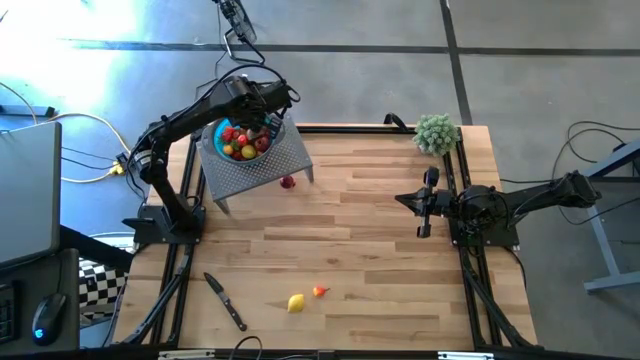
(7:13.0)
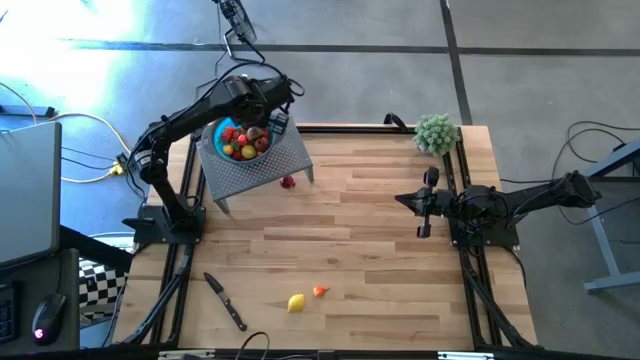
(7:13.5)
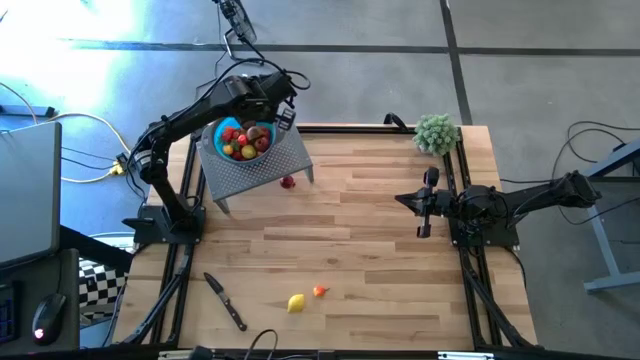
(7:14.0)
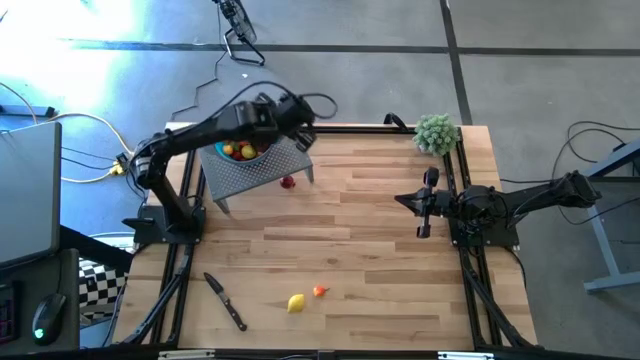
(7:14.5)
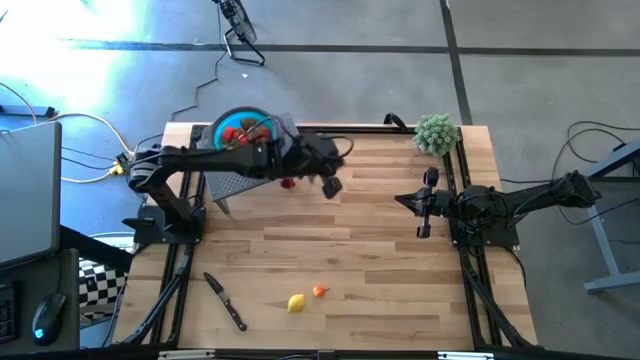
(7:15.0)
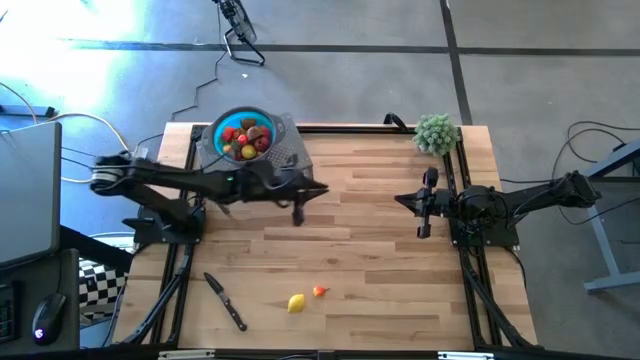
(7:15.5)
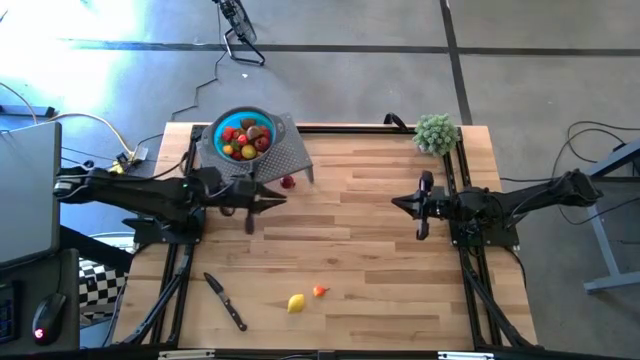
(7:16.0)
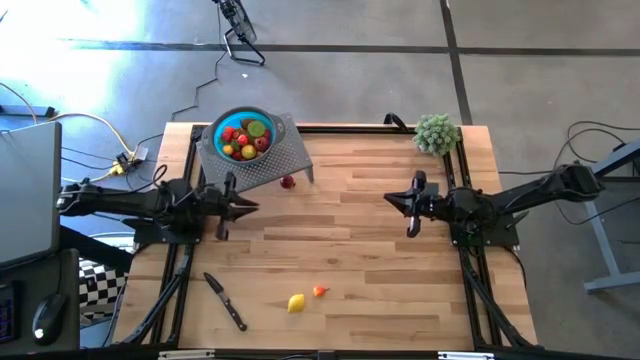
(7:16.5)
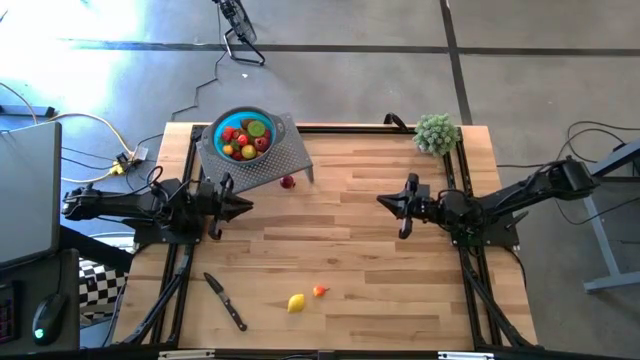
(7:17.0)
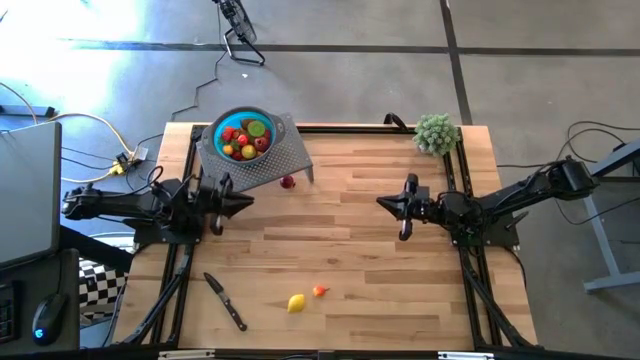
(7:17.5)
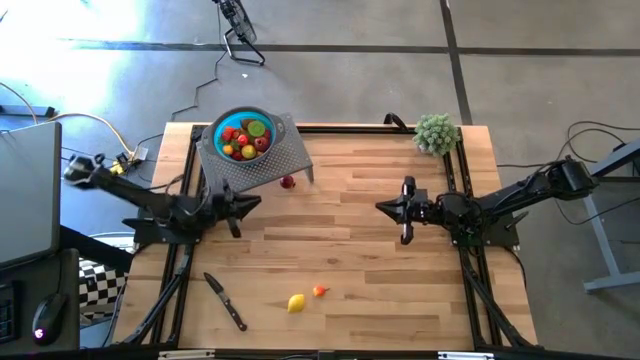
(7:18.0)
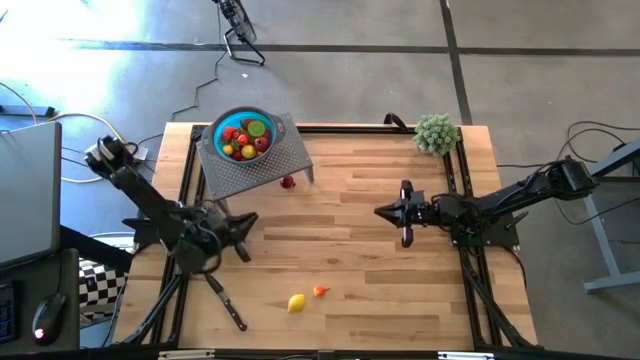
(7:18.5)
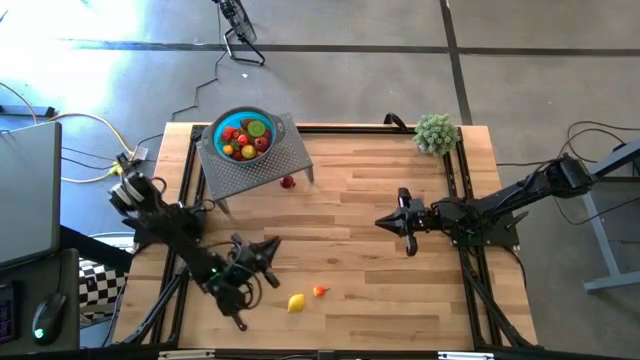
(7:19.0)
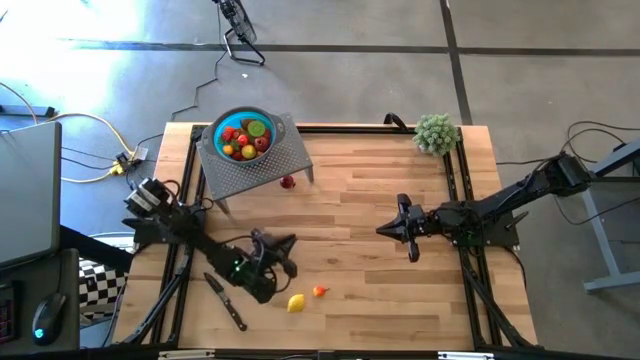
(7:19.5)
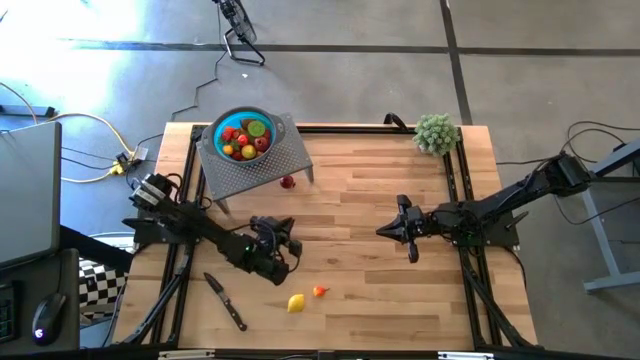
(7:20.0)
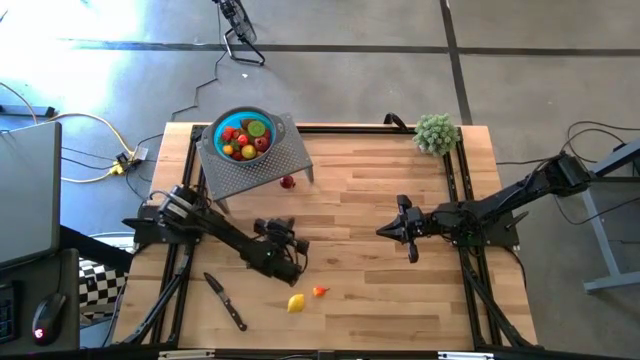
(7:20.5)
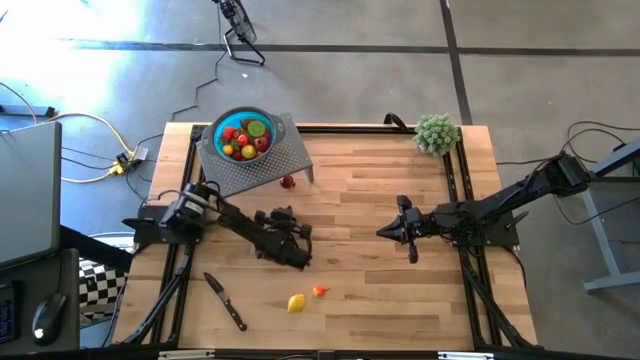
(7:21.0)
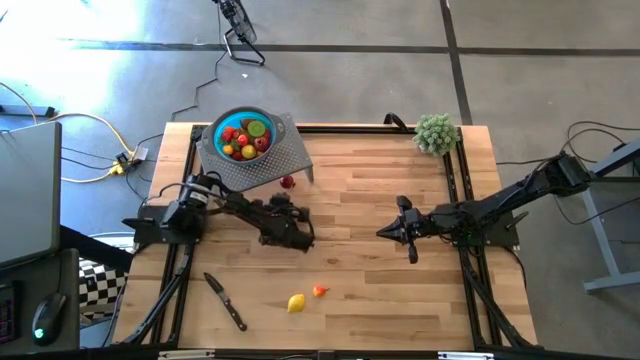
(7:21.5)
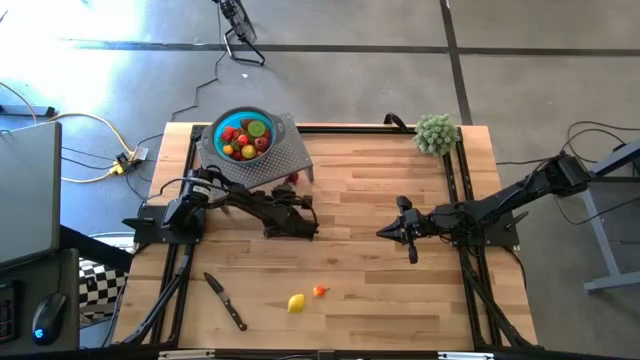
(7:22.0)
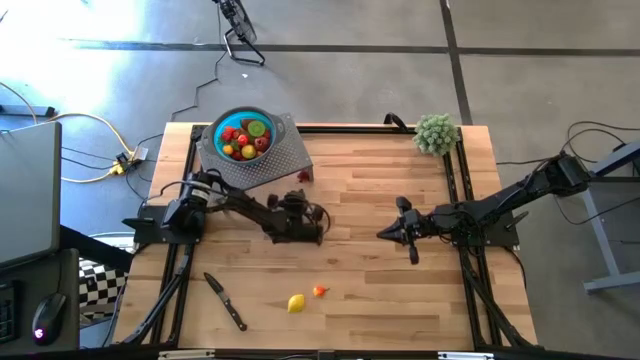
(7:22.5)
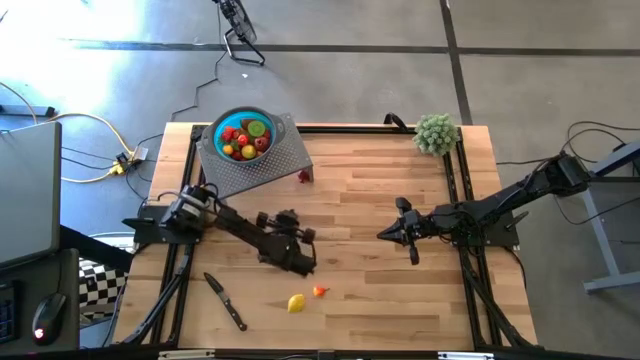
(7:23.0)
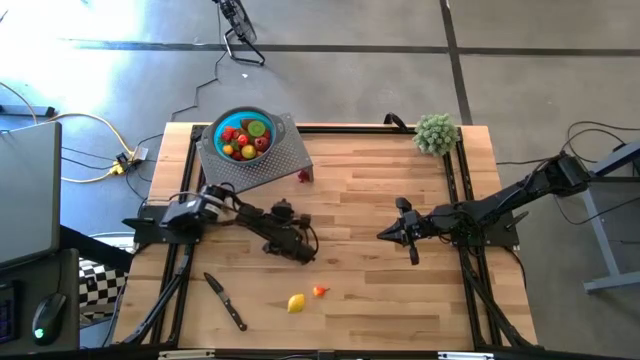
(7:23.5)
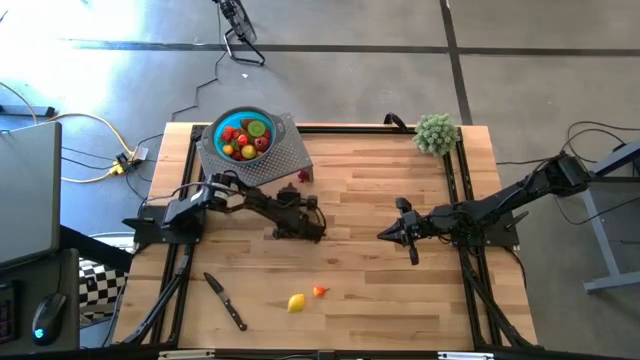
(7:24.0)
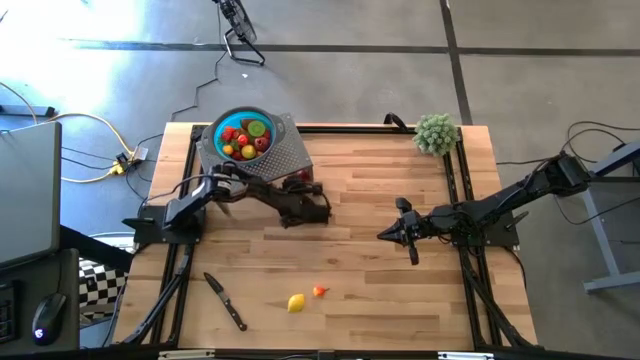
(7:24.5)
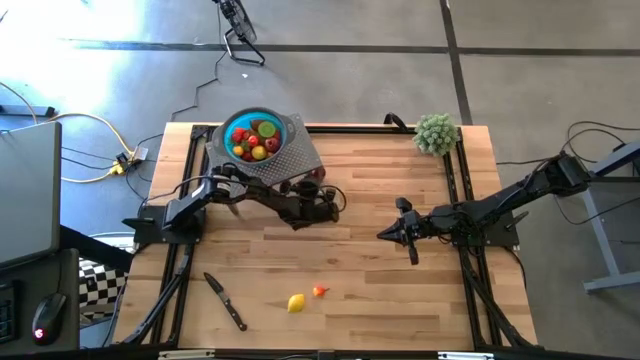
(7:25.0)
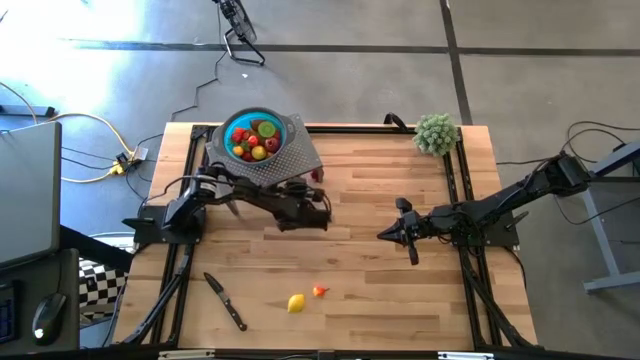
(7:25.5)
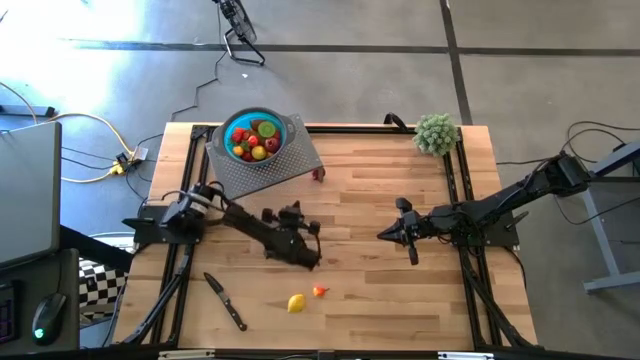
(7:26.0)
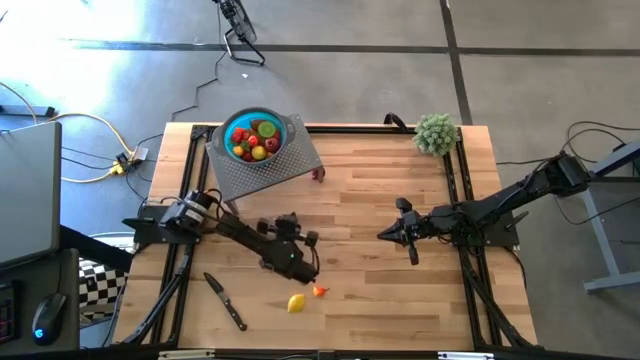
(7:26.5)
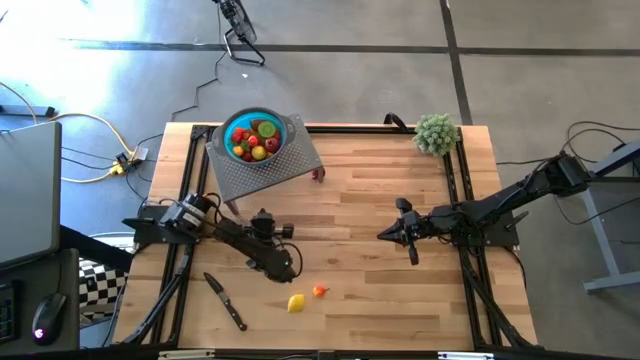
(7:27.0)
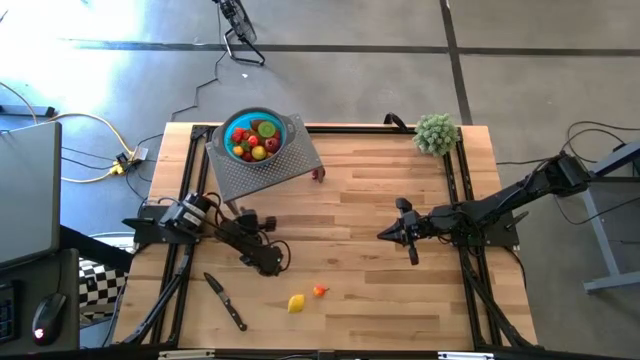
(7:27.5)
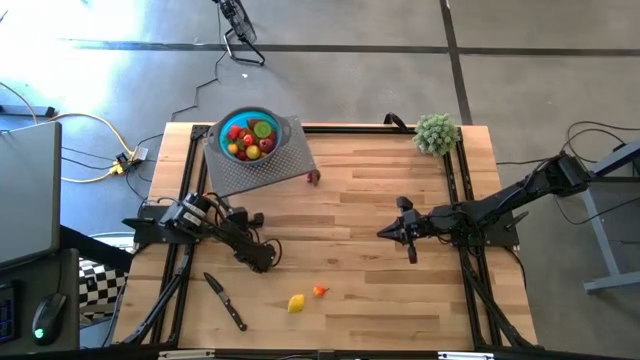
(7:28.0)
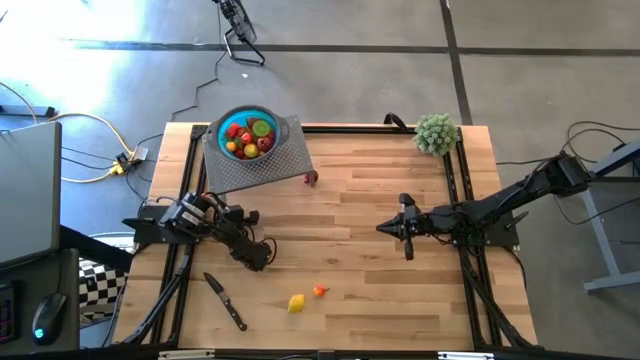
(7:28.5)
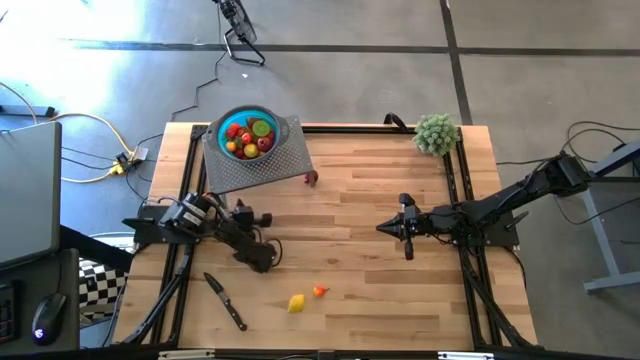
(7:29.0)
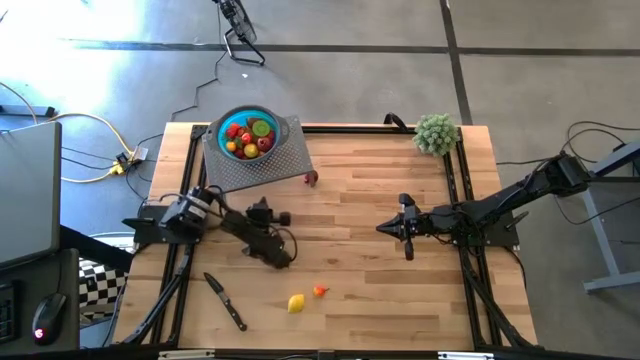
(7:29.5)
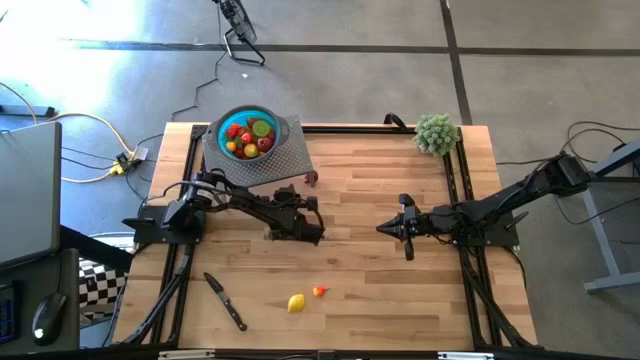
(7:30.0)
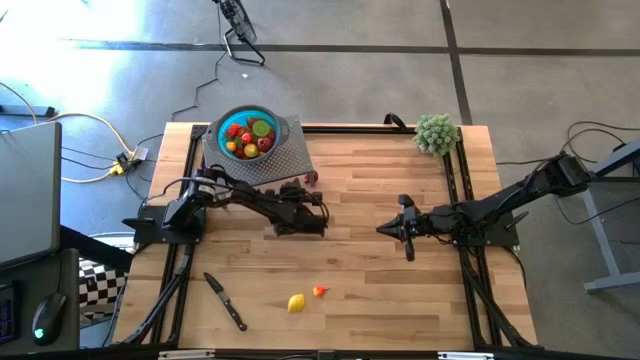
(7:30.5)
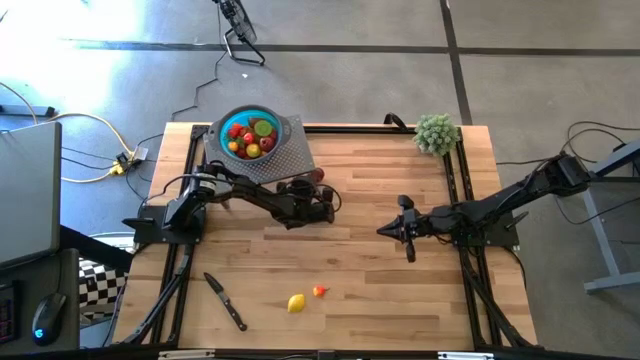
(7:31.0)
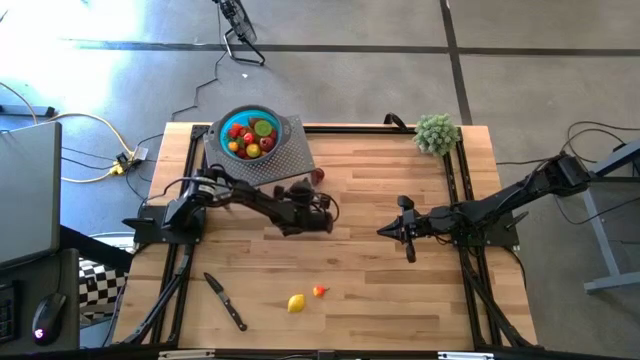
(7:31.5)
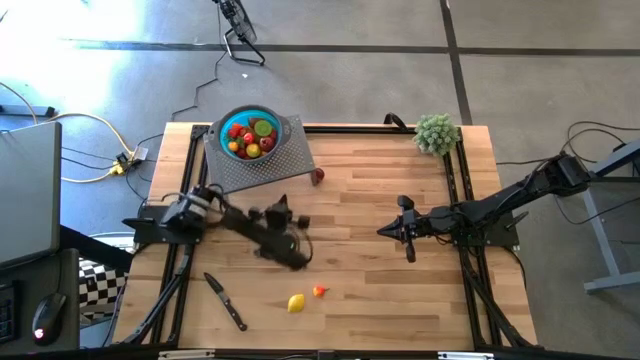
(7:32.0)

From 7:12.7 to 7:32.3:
Task: Pick & Place Fruit
Put the red pomegranate into the blue strainer bowl on the shelf

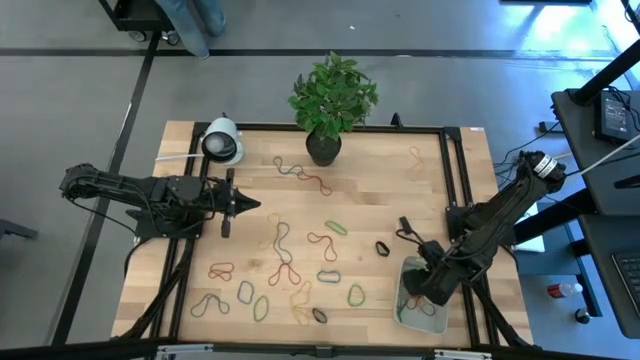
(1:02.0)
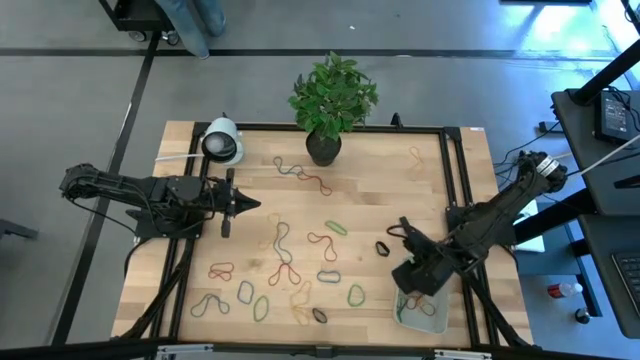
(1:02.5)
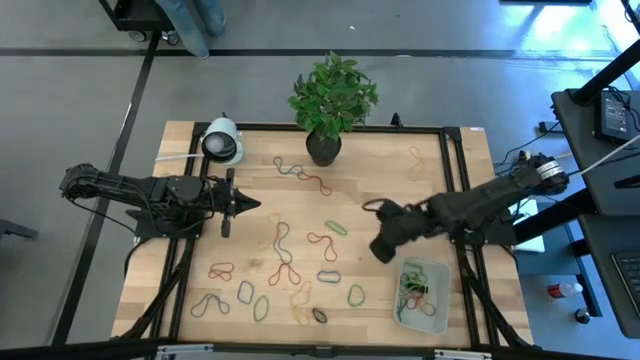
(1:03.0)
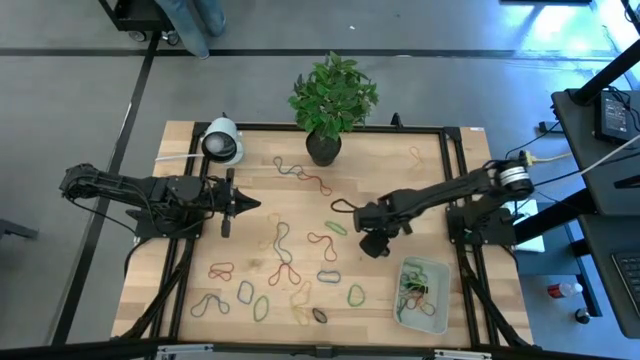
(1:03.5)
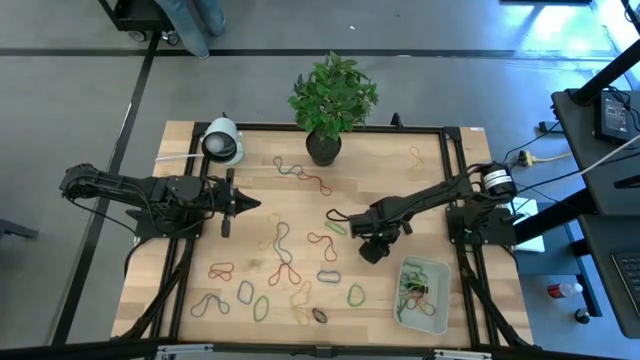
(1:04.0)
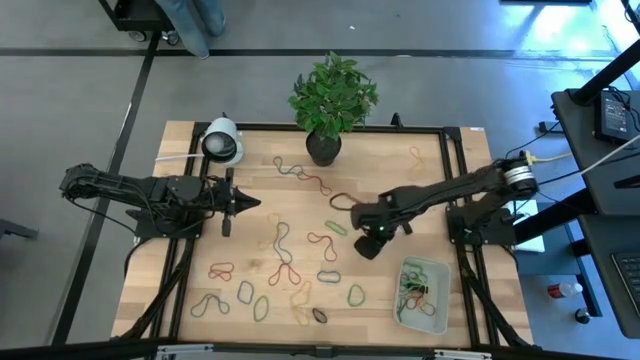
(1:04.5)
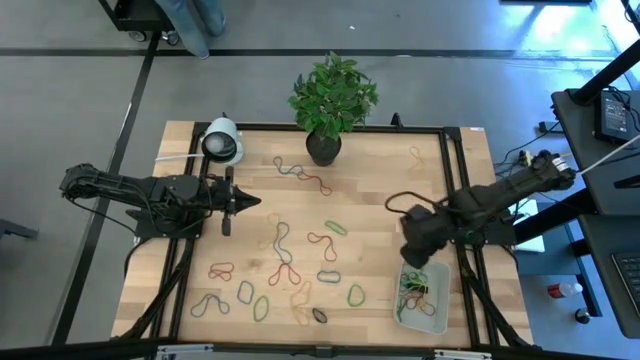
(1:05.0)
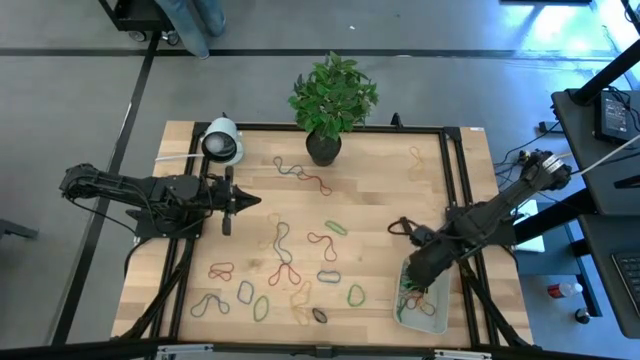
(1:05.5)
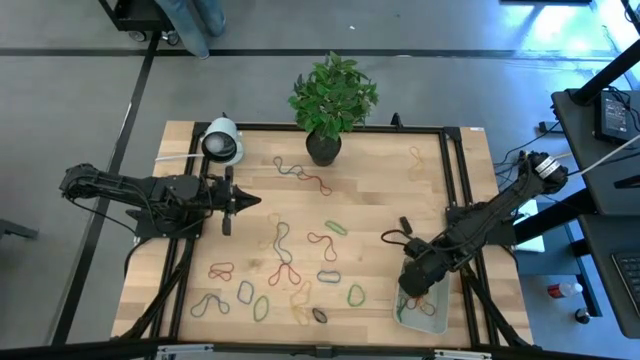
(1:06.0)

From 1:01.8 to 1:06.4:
Task: Pick and place rubber bands into bin
Put the black rubber band into the gray bin
